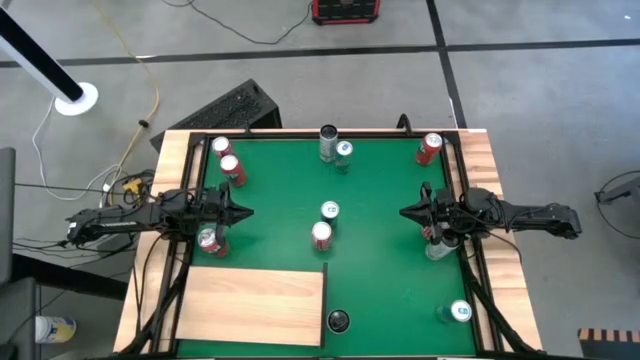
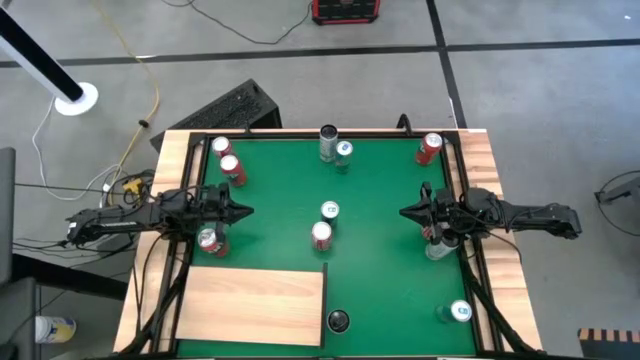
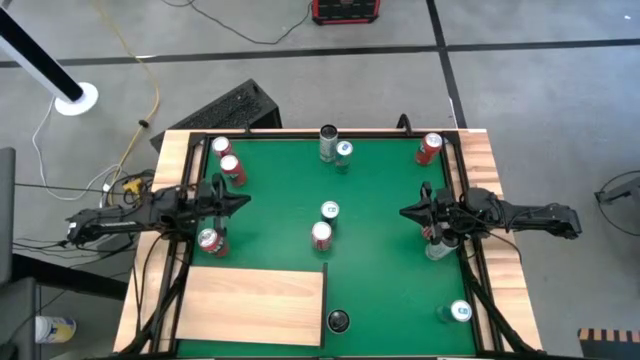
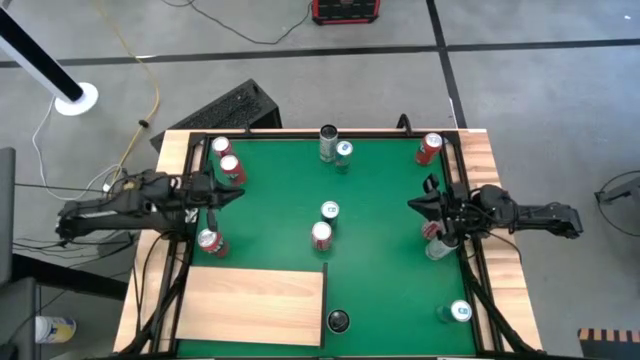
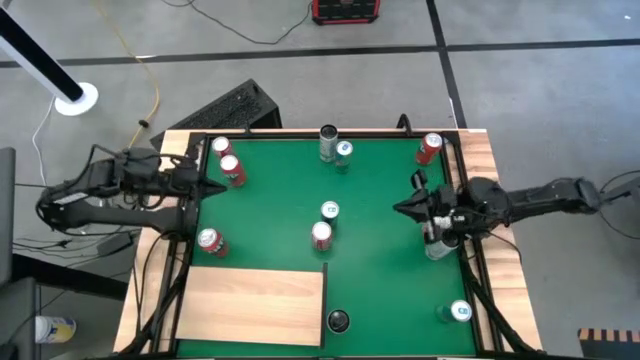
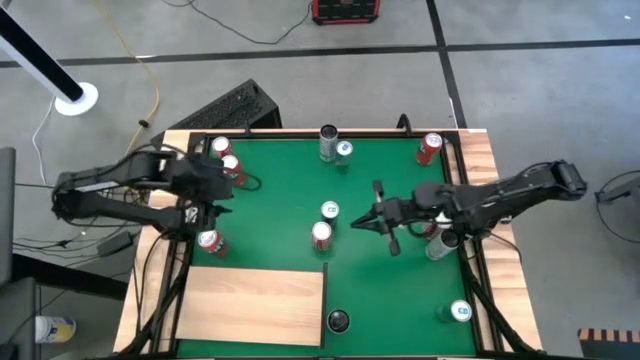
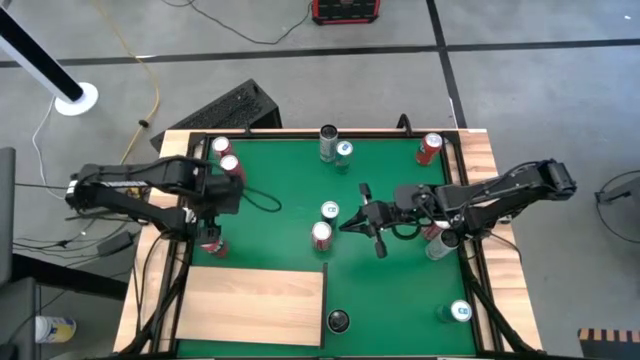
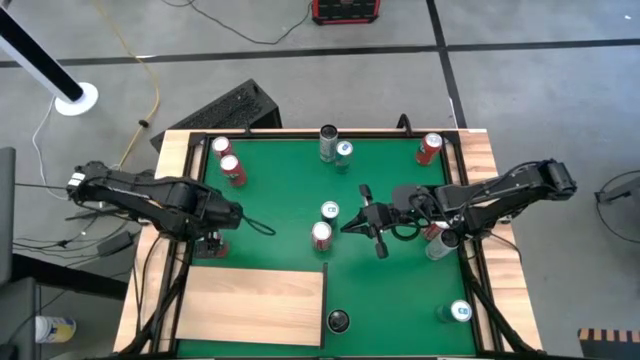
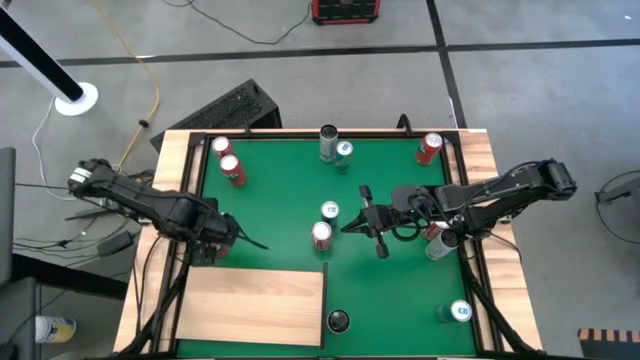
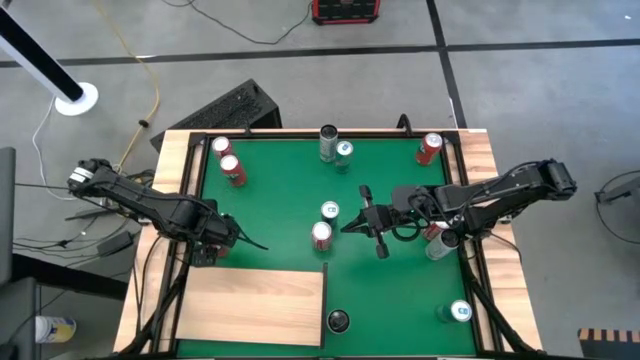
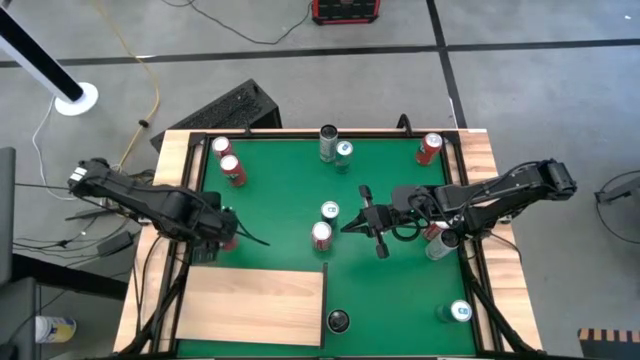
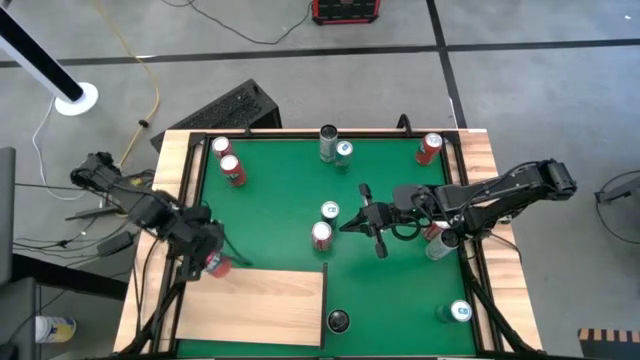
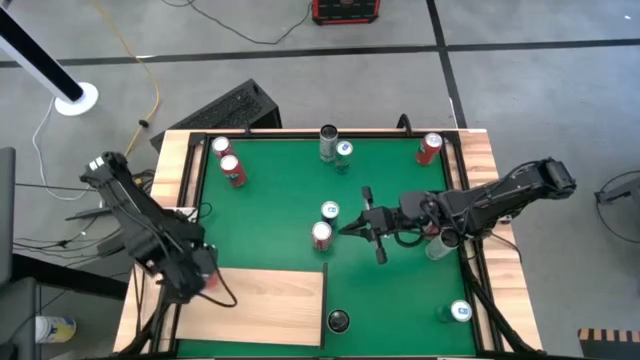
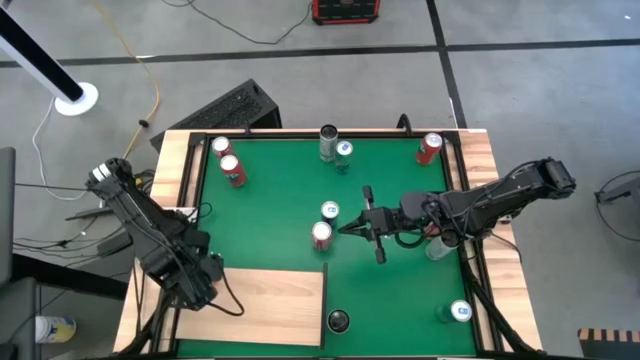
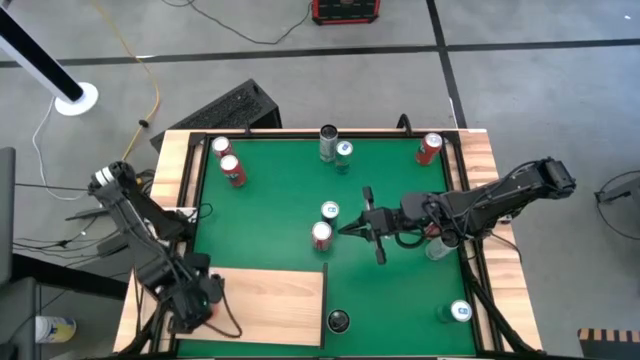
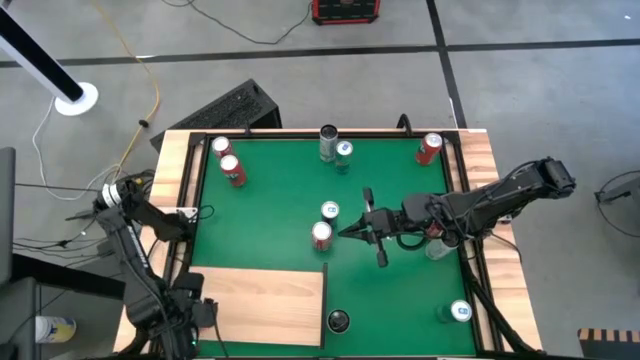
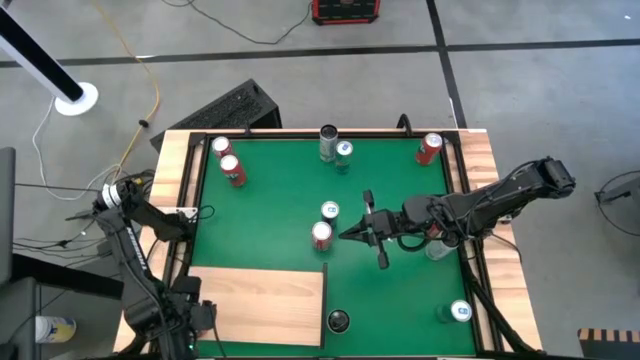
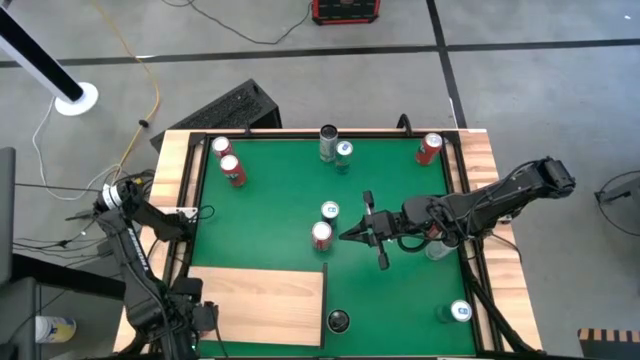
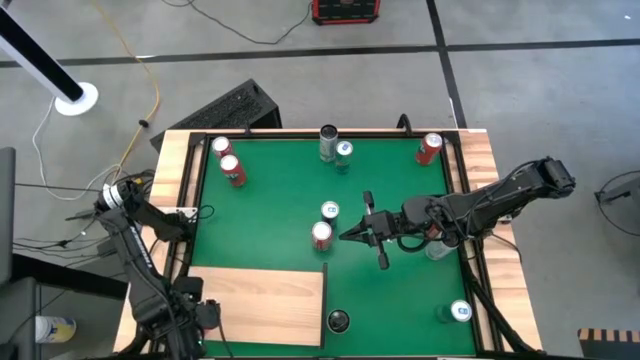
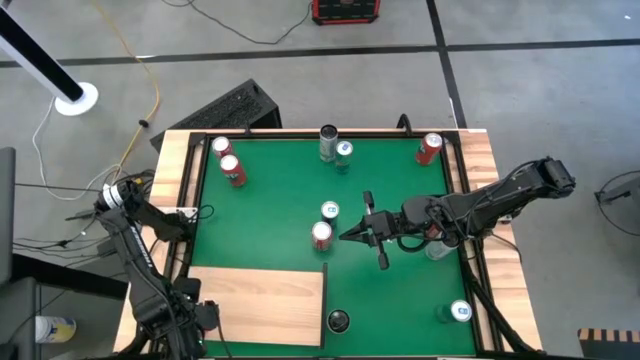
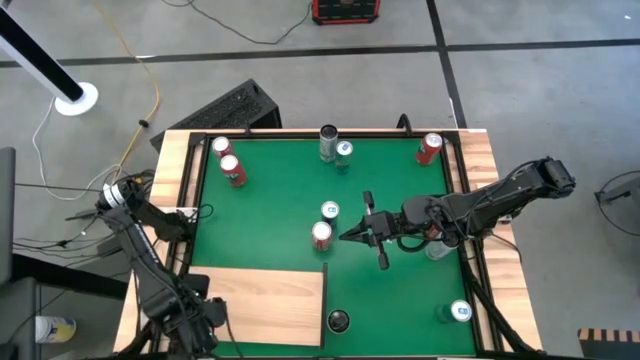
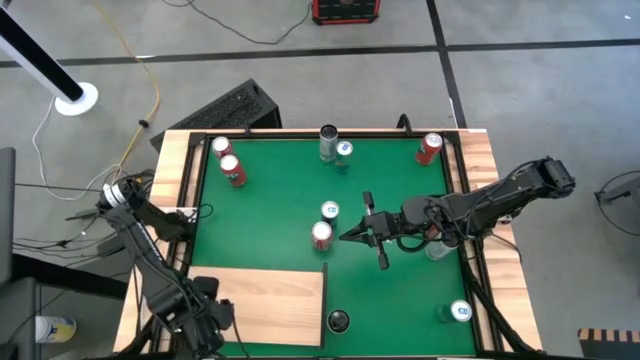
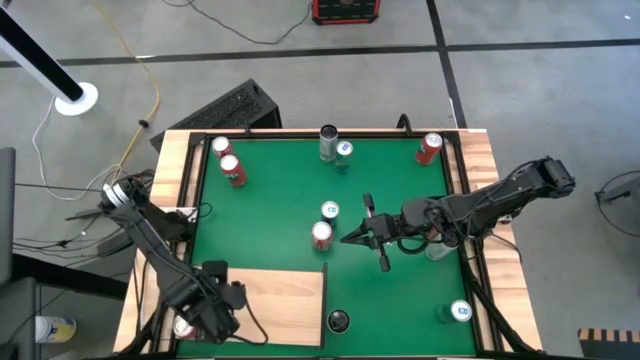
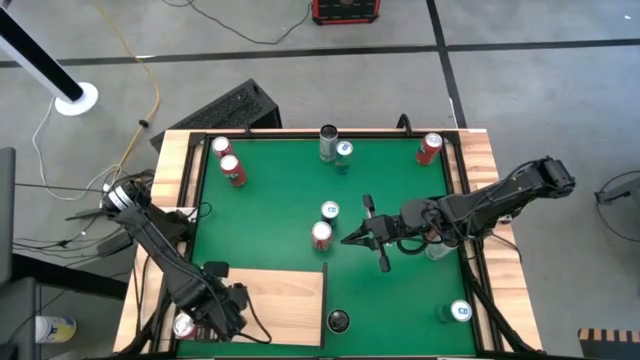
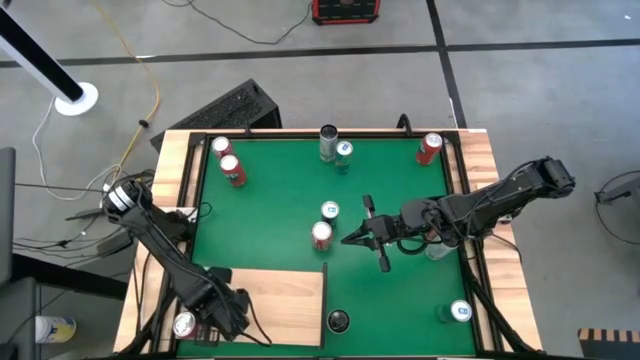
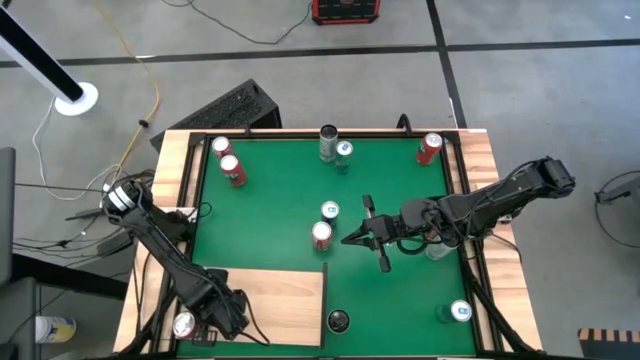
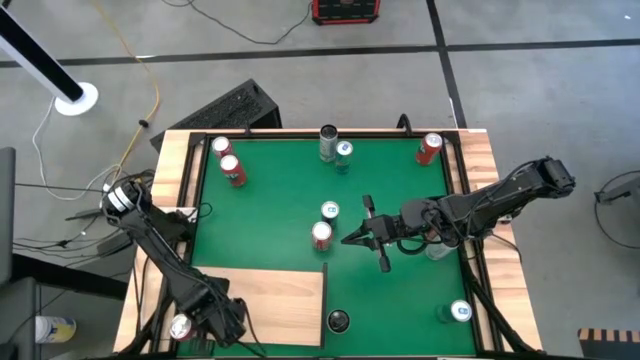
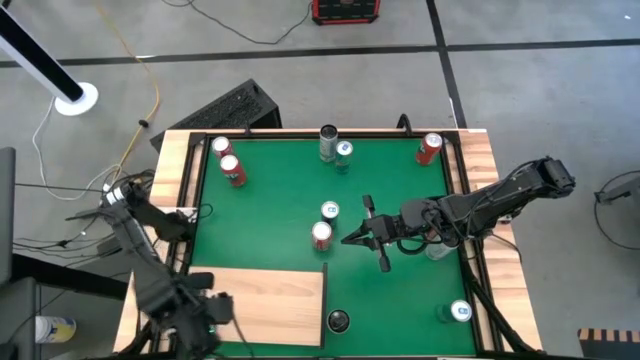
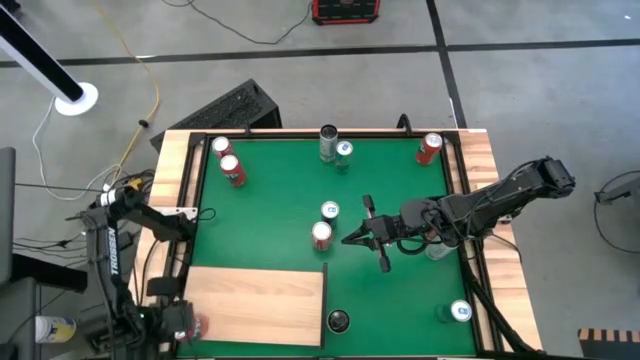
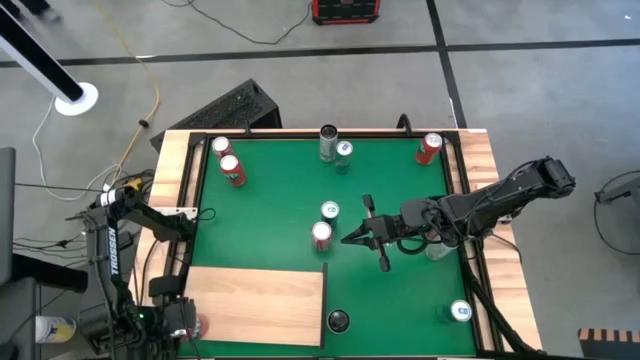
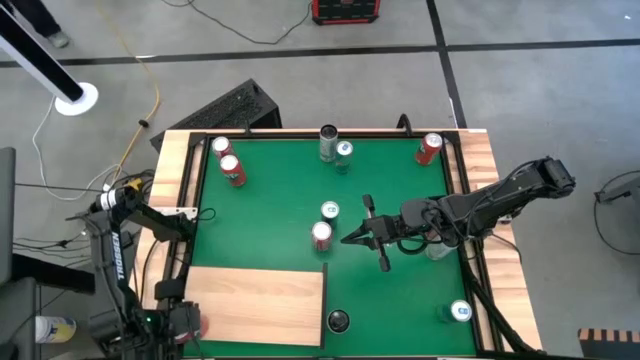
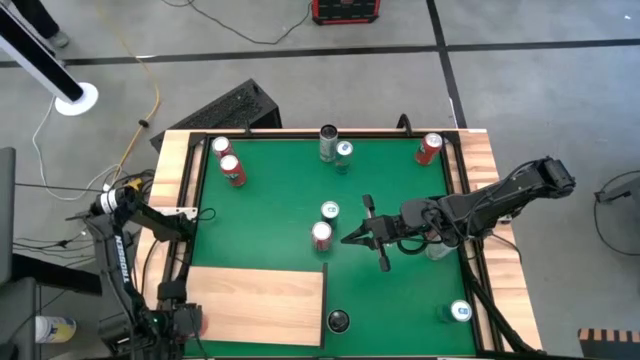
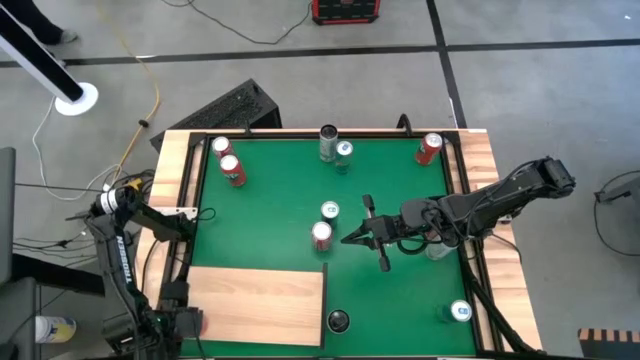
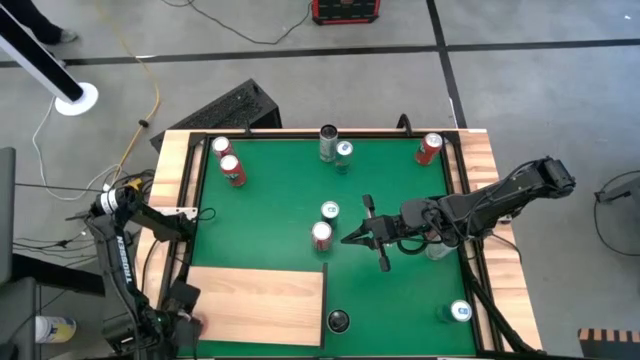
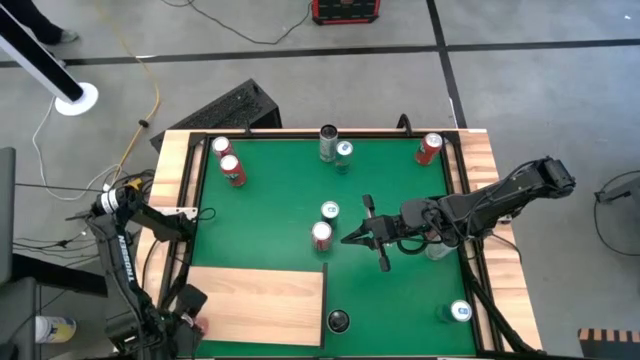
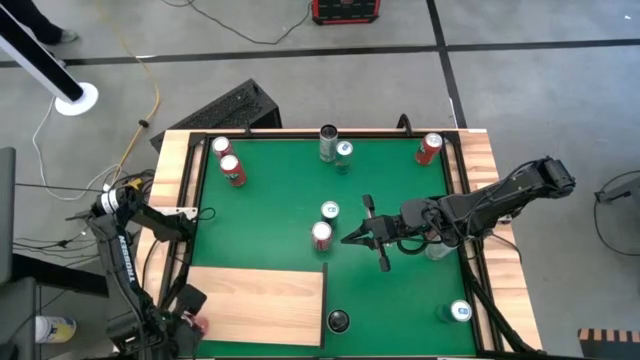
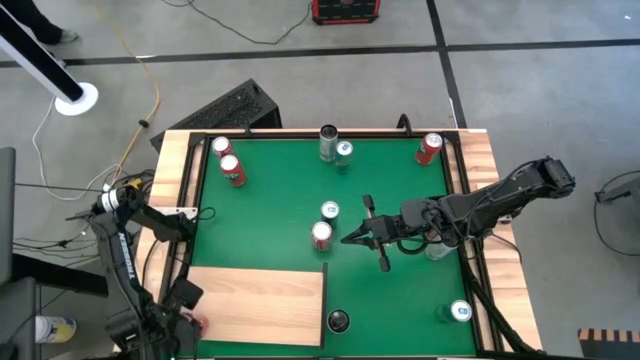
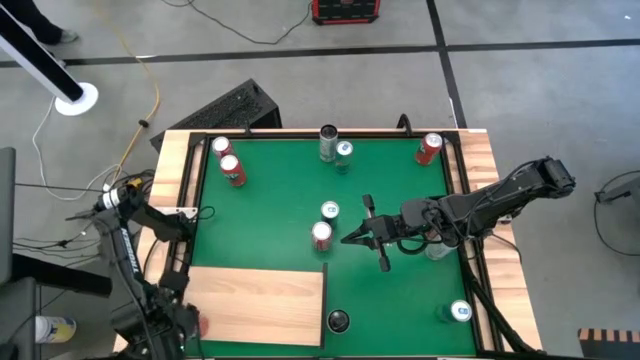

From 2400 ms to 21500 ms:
Task: Place canned beverage on shelf
Put the bottom left orange soda can on the shelf
